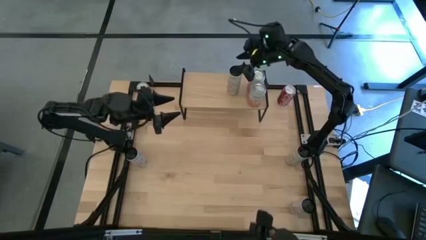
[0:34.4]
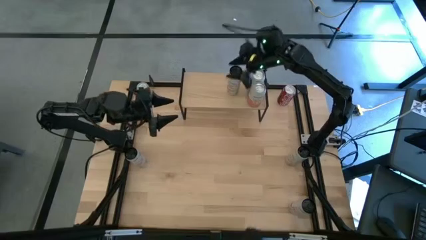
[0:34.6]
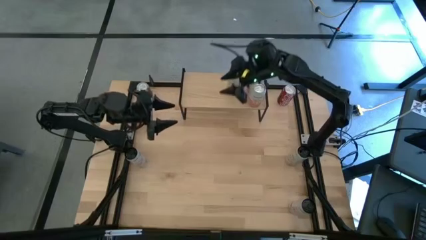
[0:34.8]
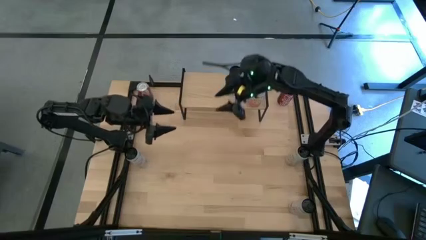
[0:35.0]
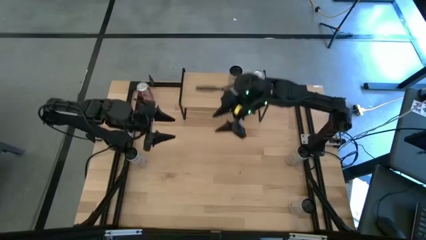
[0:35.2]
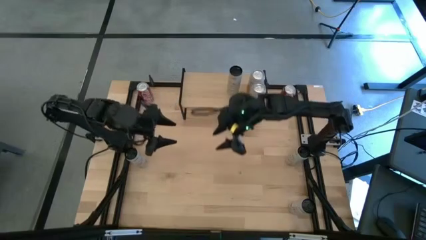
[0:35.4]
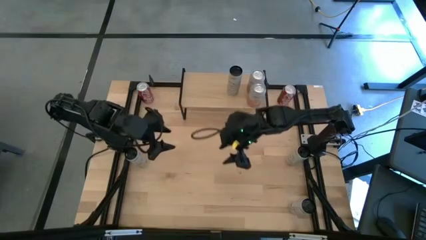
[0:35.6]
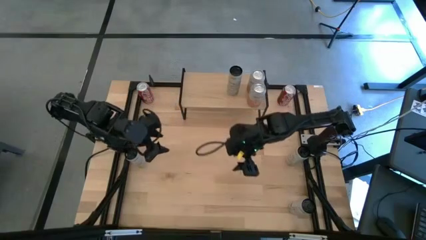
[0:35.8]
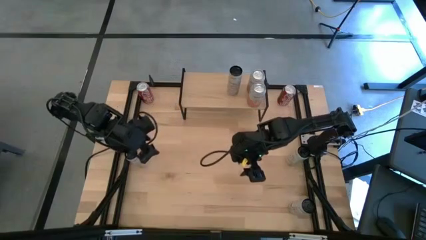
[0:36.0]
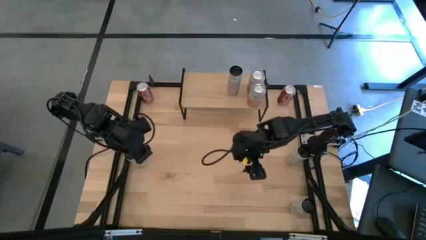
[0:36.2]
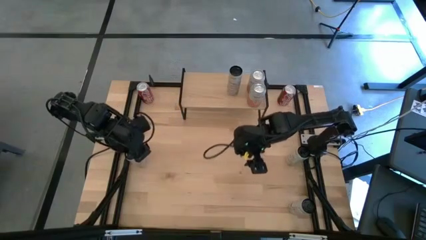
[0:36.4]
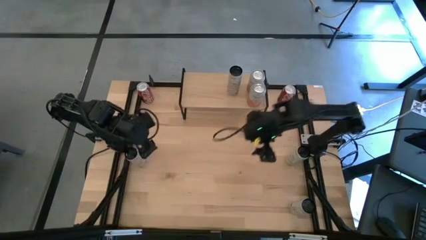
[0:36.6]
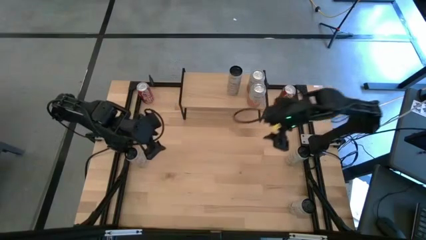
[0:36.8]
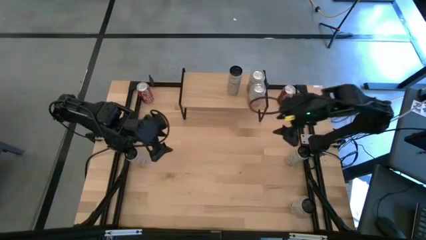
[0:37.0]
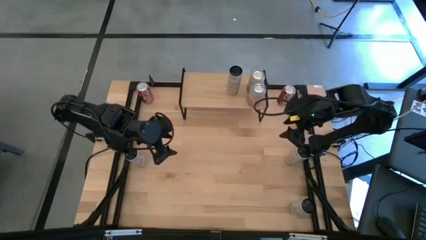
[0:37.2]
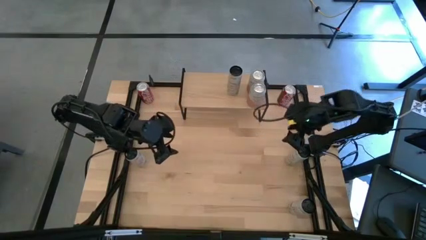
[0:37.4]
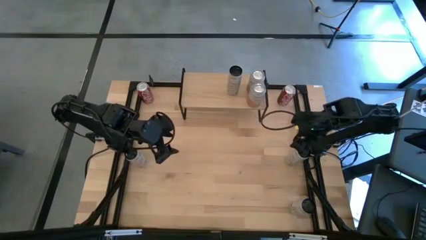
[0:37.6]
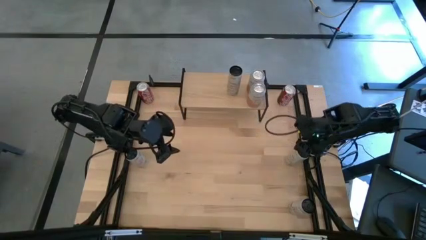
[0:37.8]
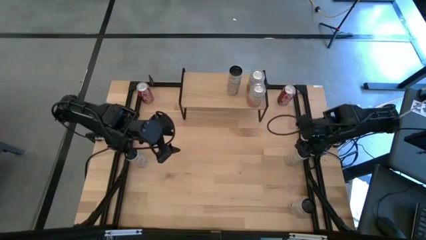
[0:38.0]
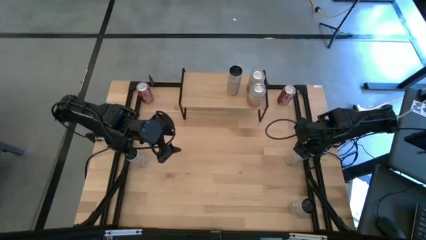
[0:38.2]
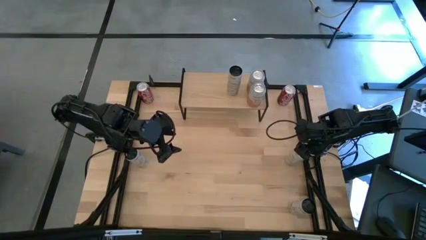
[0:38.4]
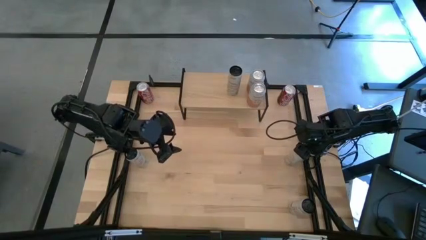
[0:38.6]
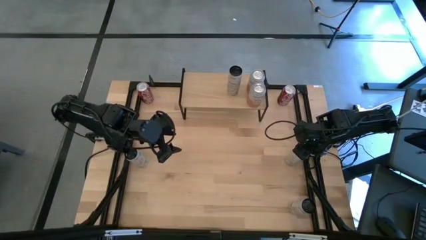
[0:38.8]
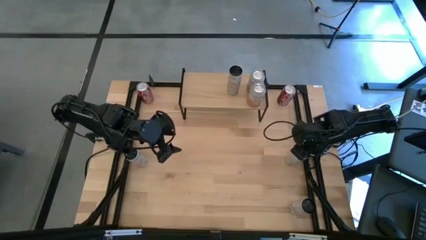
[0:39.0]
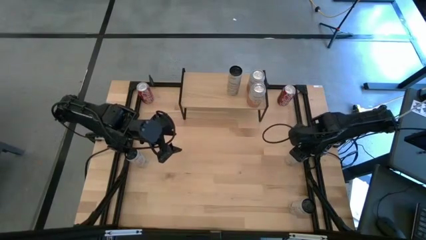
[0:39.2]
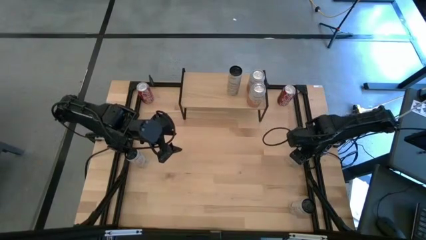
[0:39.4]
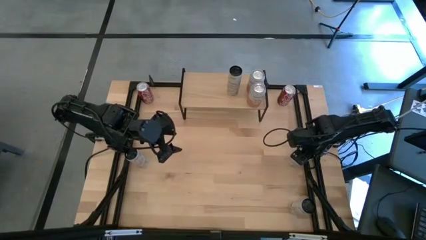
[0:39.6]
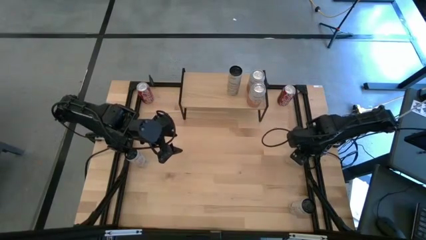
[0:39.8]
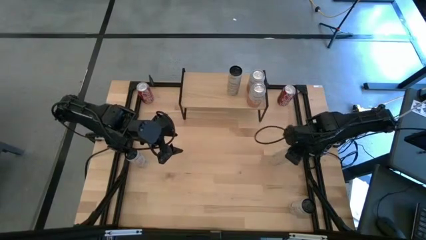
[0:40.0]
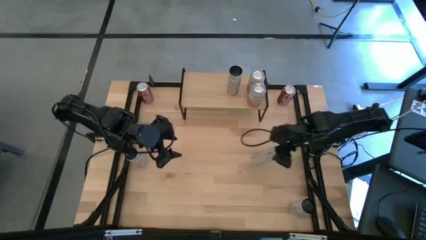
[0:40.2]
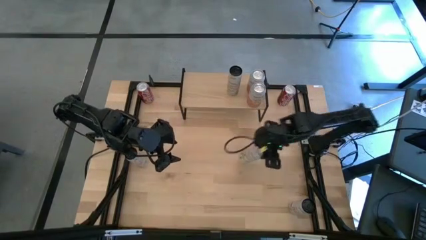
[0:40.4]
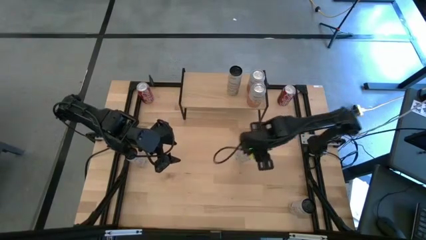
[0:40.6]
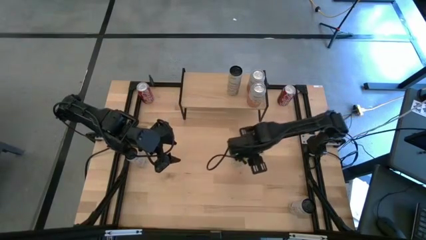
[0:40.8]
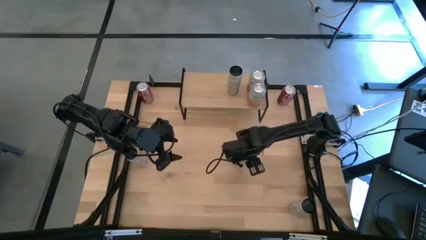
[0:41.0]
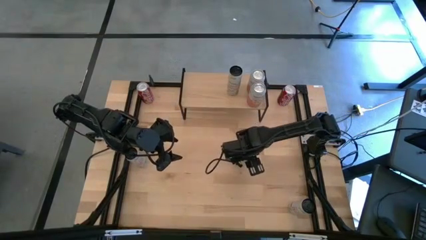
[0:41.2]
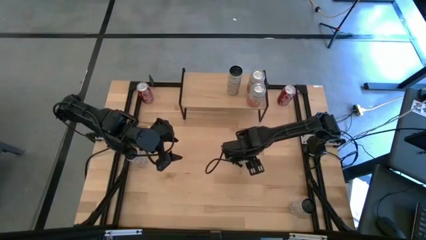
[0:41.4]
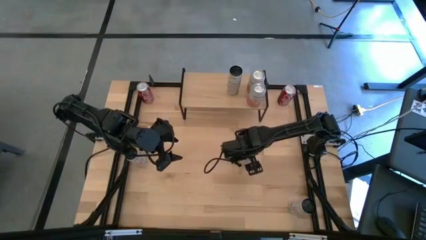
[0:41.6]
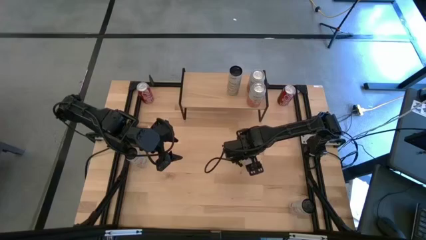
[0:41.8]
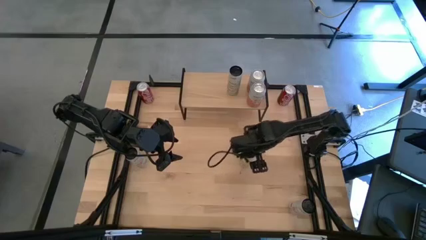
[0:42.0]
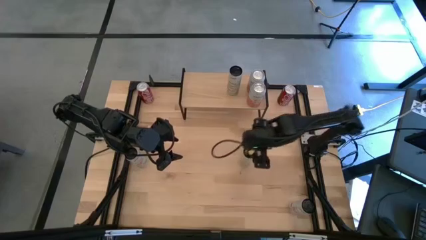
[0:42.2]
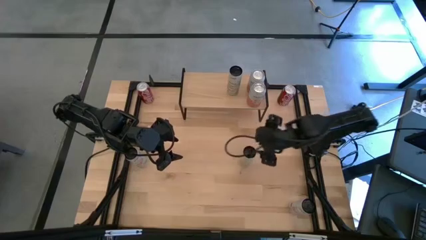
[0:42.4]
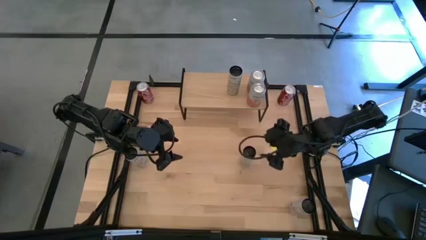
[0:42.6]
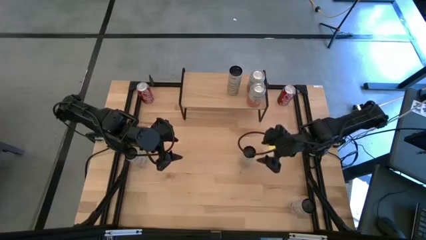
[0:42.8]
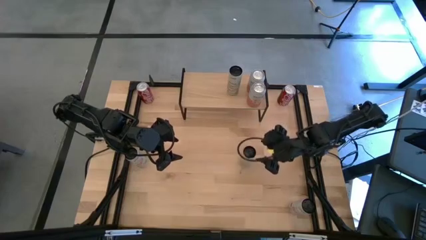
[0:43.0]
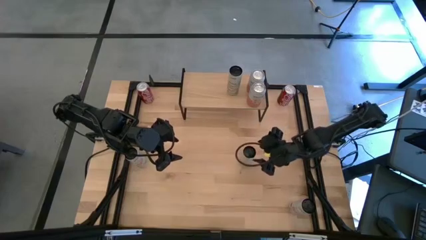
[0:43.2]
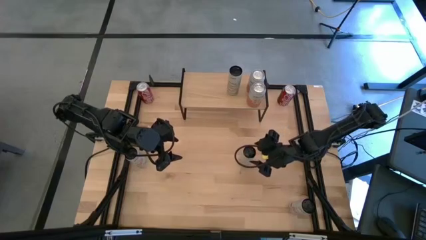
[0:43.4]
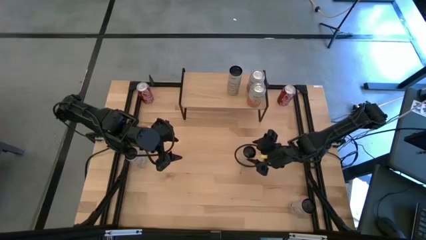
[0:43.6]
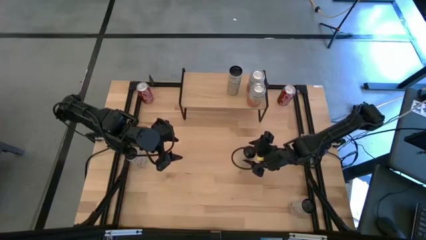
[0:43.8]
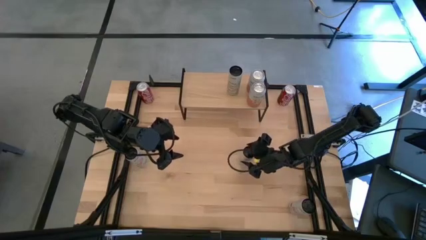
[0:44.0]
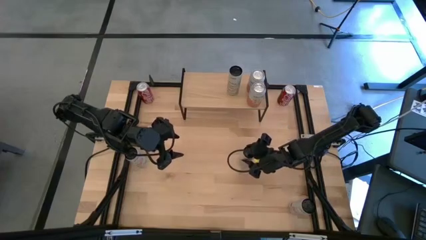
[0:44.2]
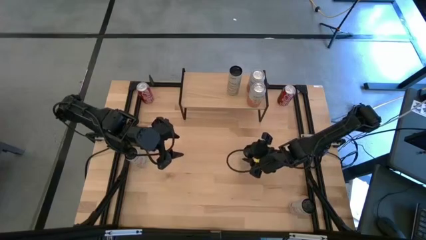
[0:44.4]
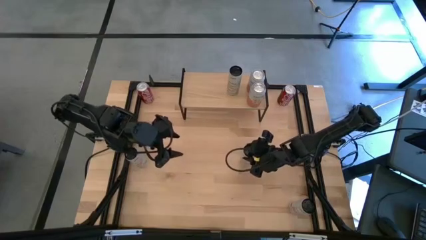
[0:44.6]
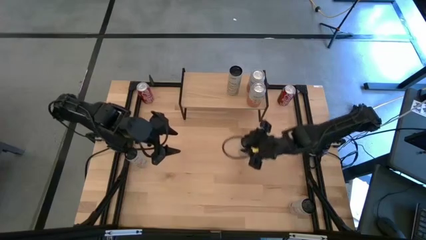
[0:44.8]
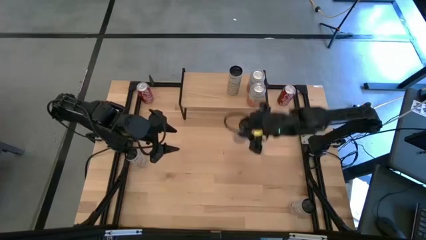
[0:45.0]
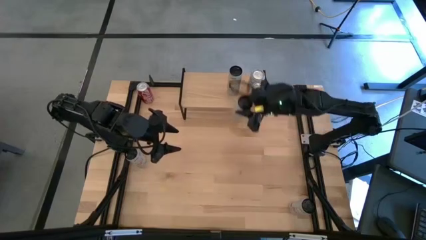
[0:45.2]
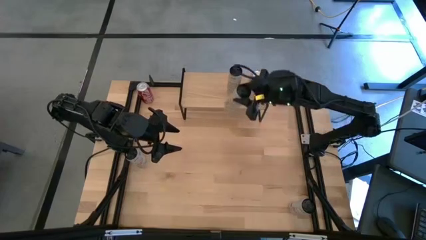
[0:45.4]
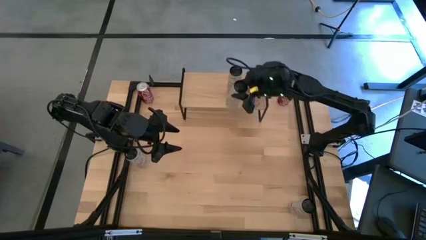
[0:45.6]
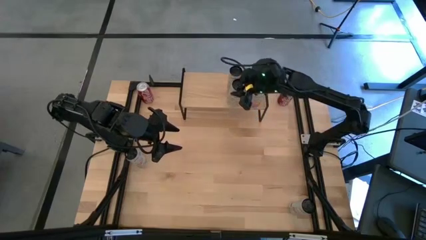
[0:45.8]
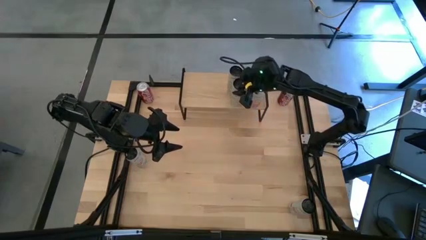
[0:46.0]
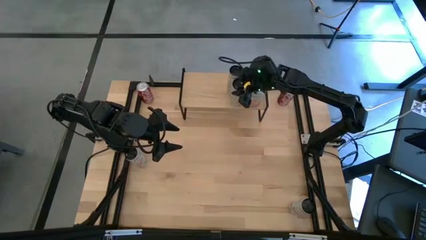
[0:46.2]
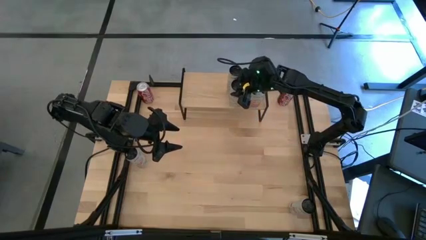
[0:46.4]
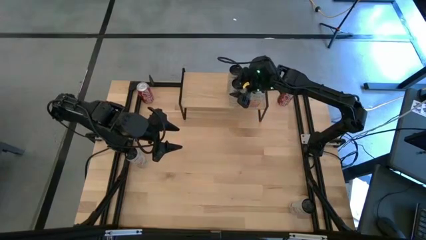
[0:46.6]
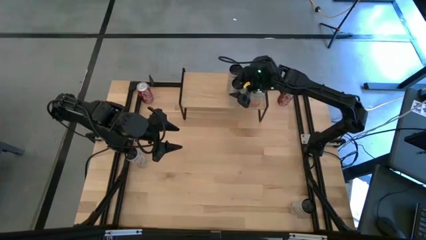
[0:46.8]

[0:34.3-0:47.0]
Task: Place canned beverage on shelf
Put the top right white and yellow soda can on the shelf aligned with the other white and yellow soda can

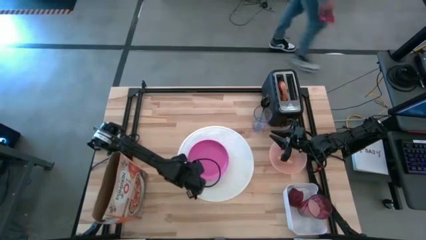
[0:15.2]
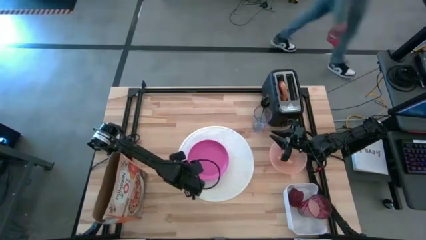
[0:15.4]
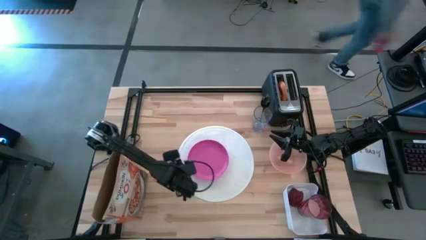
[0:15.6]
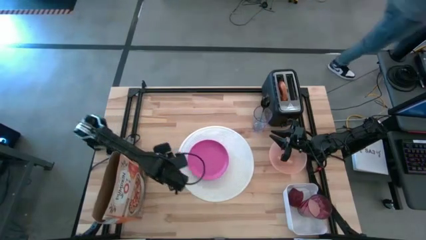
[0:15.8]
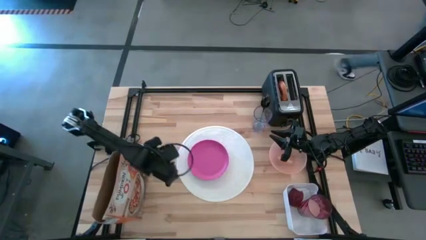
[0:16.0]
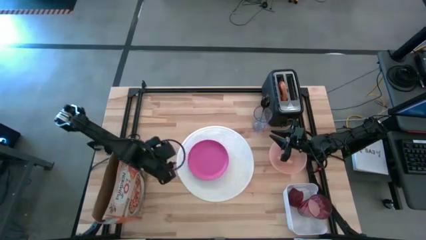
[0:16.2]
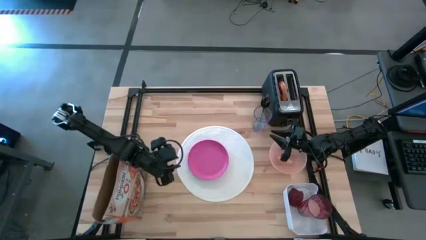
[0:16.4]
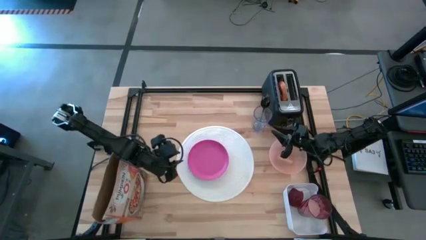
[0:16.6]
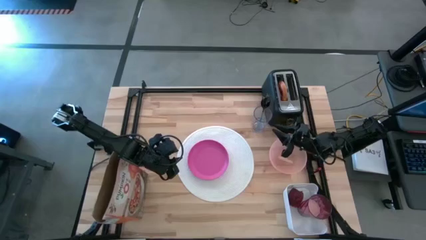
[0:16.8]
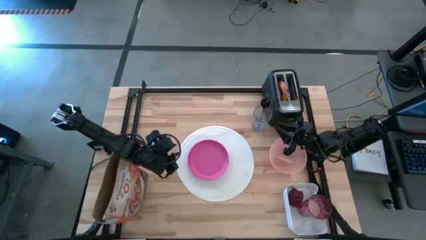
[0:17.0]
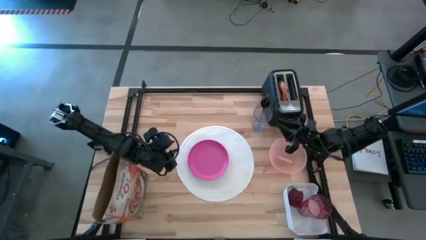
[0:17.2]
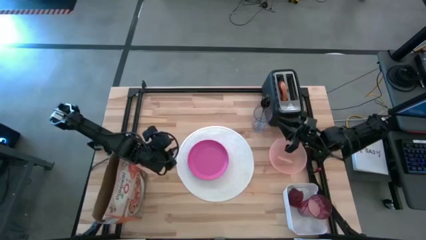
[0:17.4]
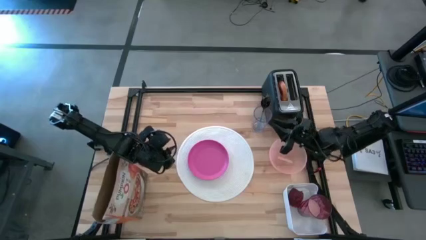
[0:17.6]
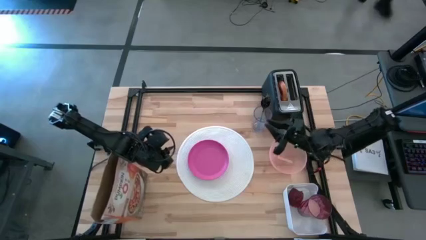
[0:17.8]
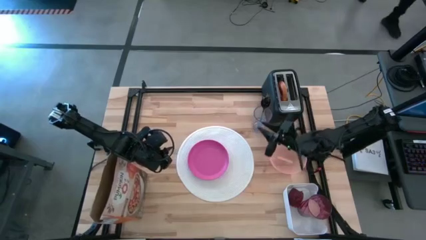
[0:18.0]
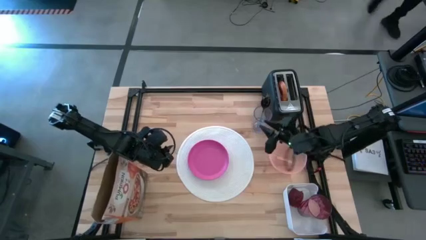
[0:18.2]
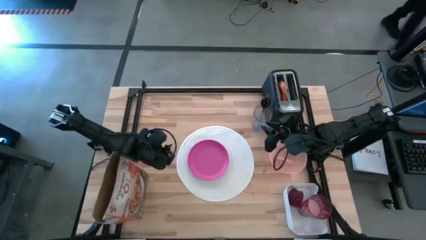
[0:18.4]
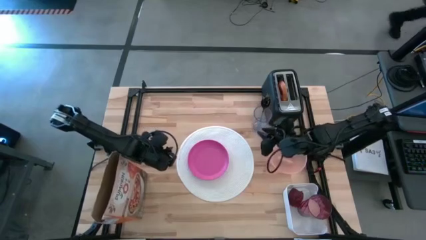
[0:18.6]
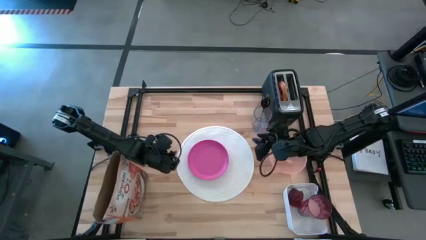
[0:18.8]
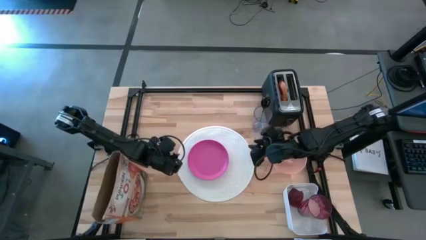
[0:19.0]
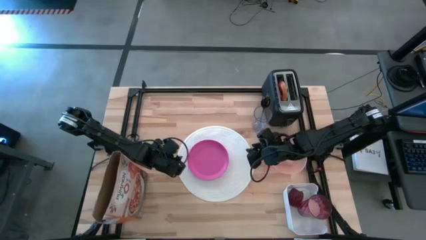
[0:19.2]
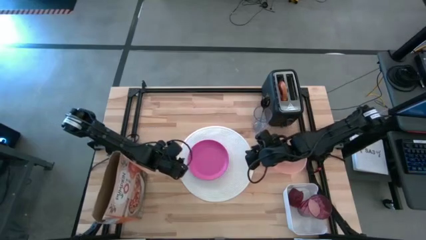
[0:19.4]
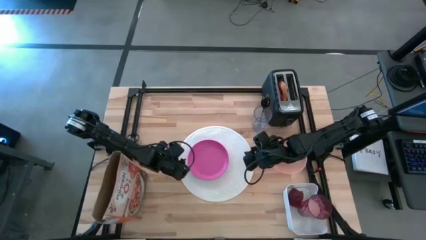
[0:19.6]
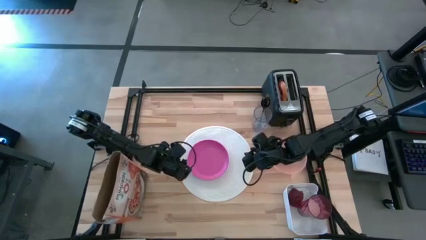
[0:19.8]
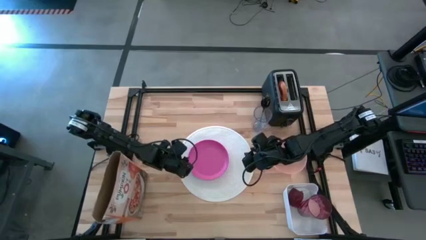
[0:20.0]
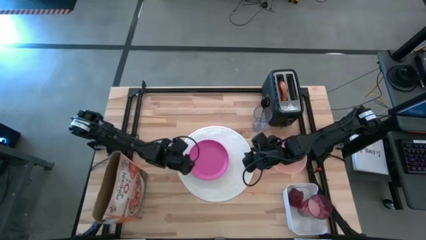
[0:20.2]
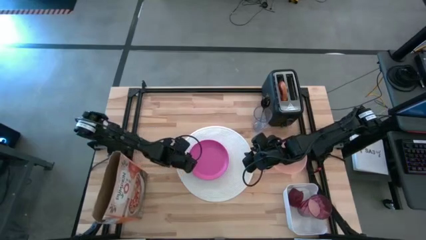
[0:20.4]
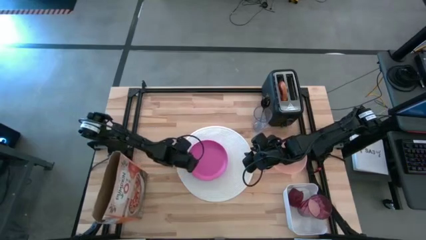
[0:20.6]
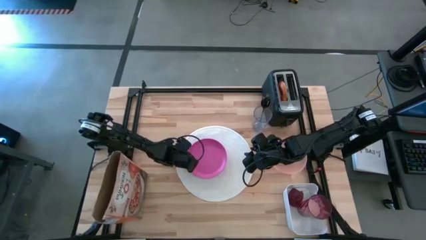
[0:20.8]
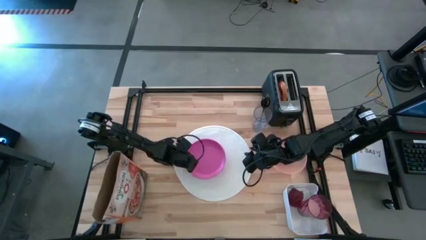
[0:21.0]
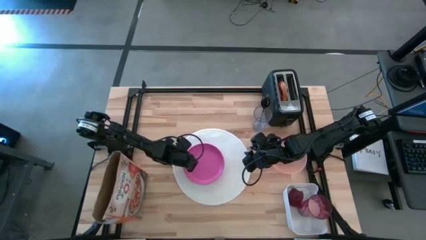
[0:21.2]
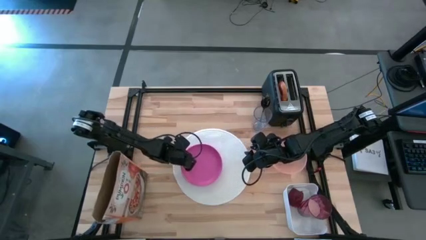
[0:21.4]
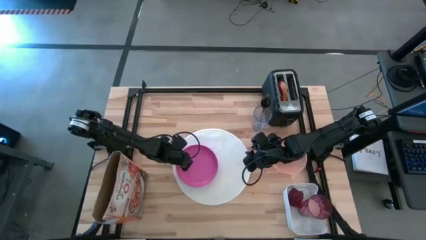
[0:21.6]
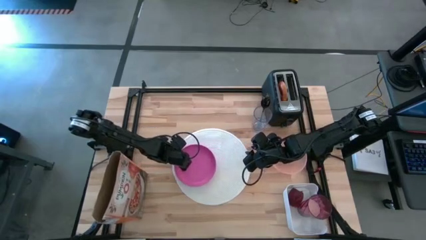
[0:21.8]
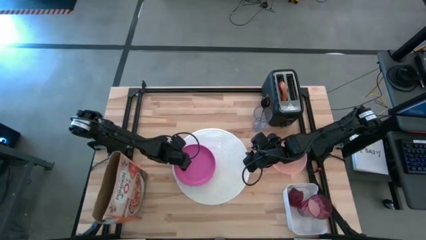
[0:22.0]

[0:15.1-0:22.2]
Task: Arrange a breakfast setting
Adjust the pink plate on the white mat
